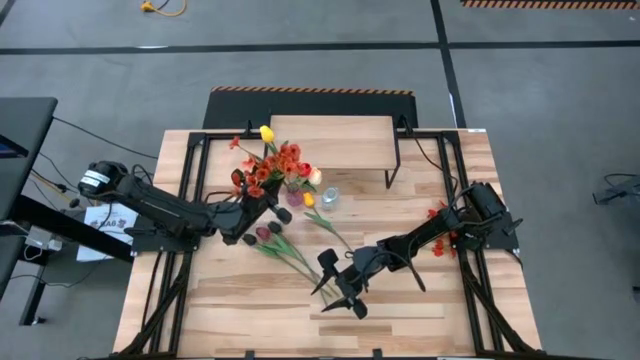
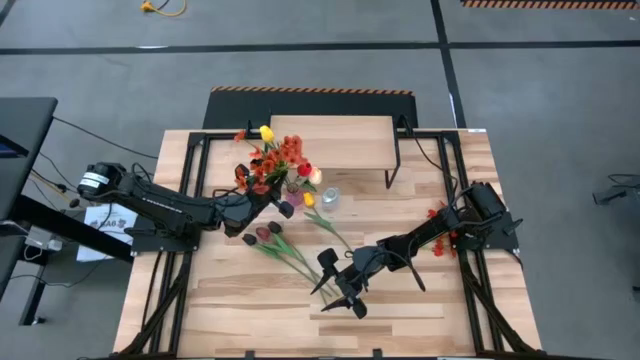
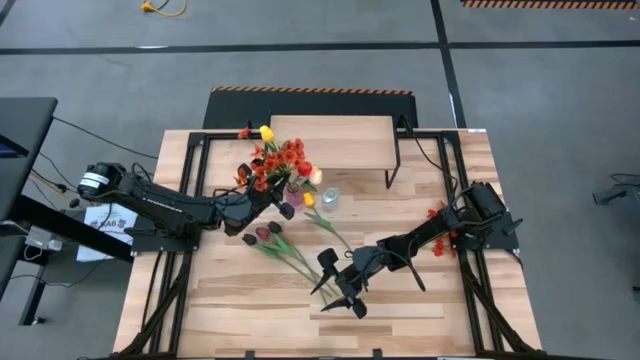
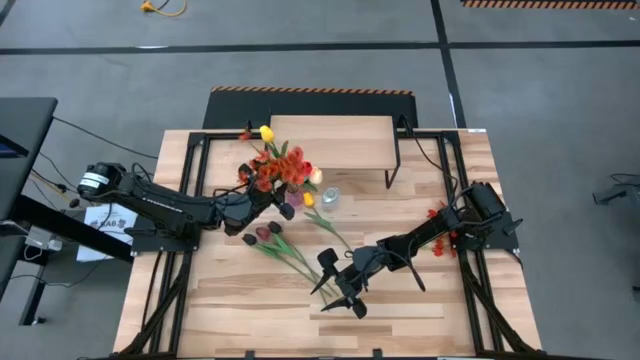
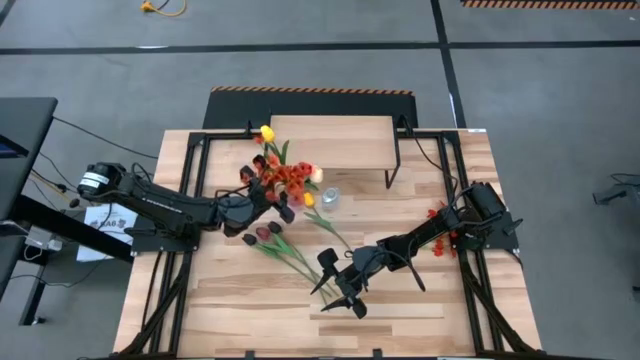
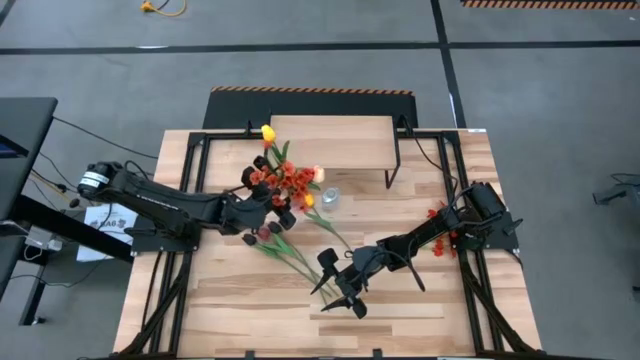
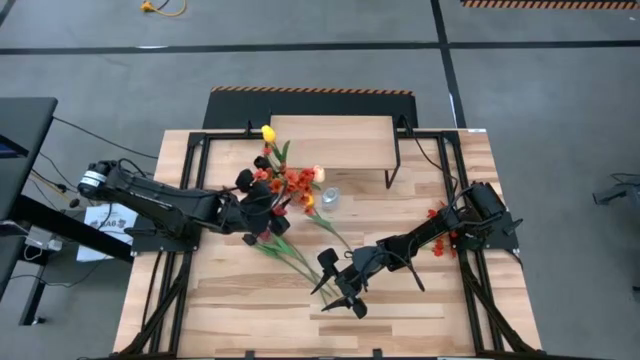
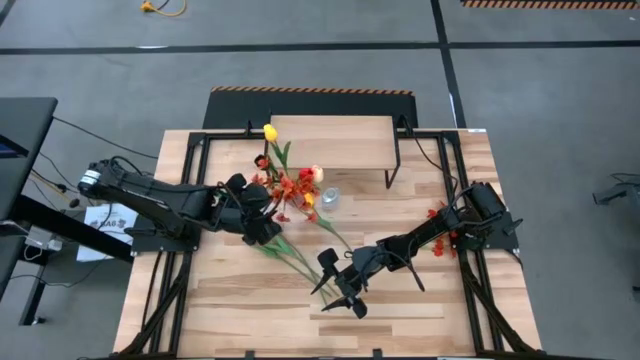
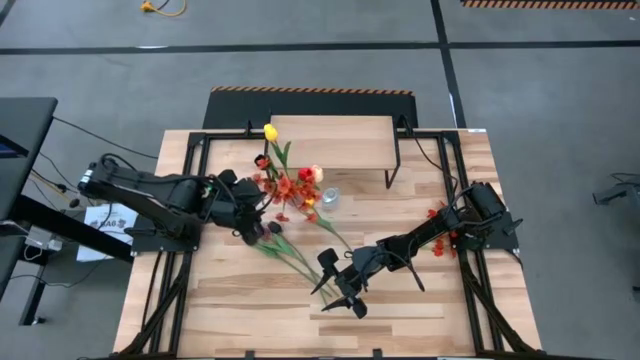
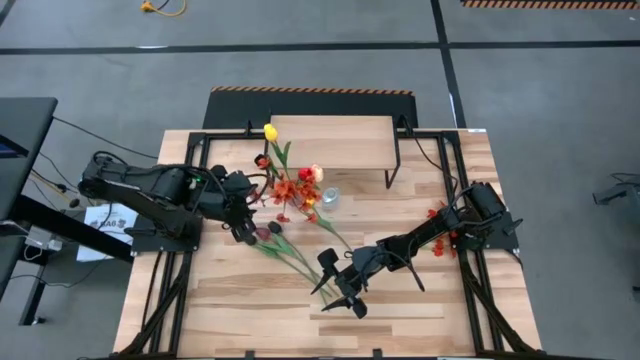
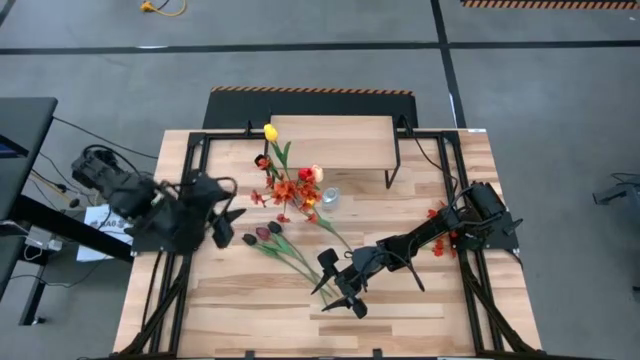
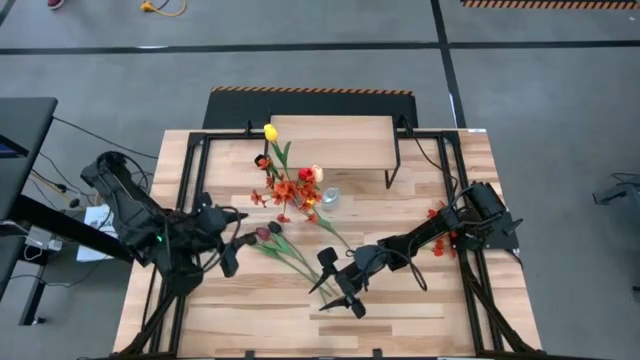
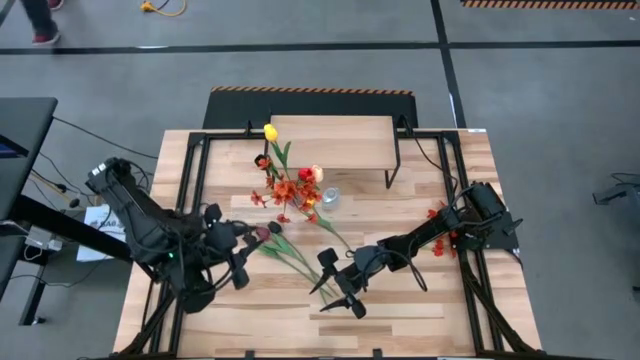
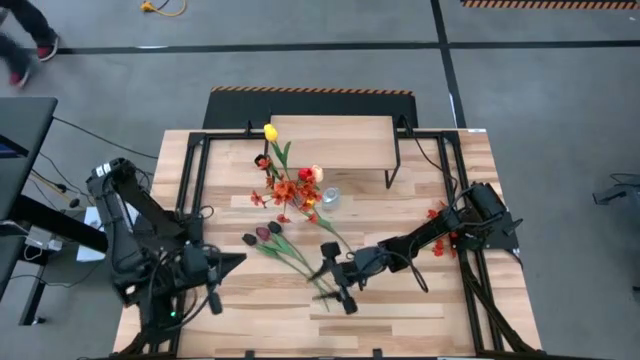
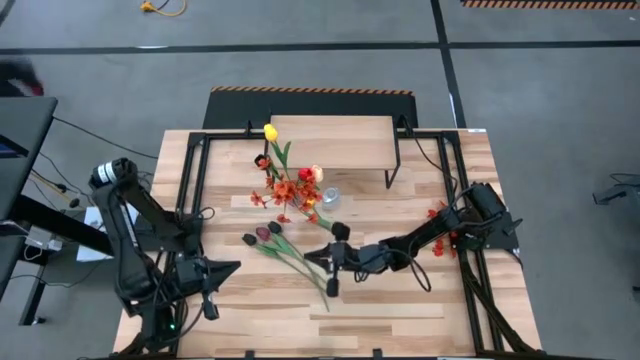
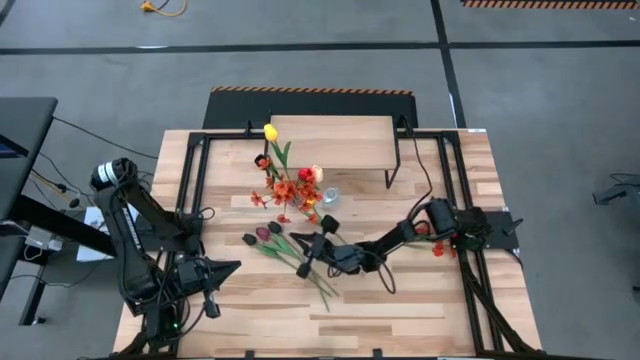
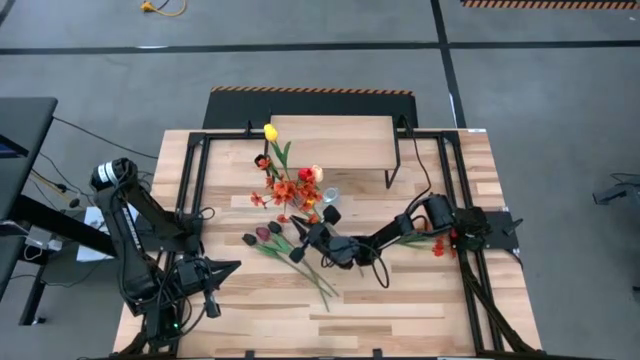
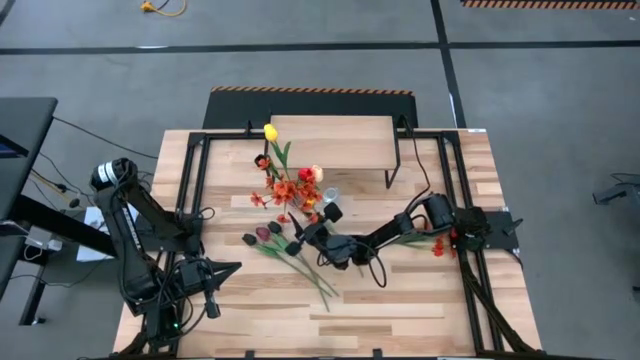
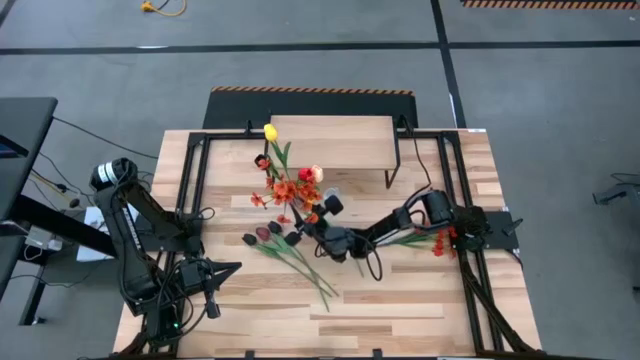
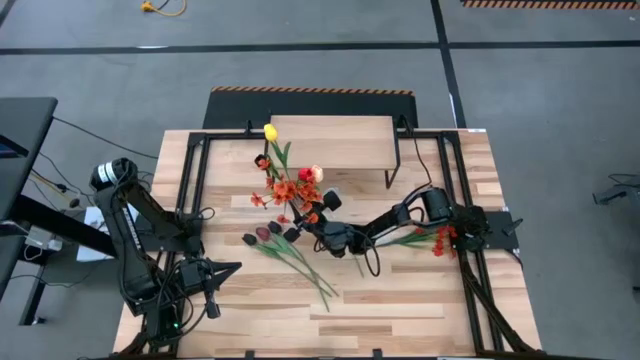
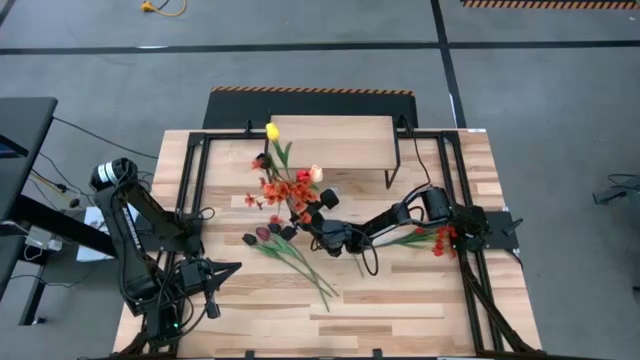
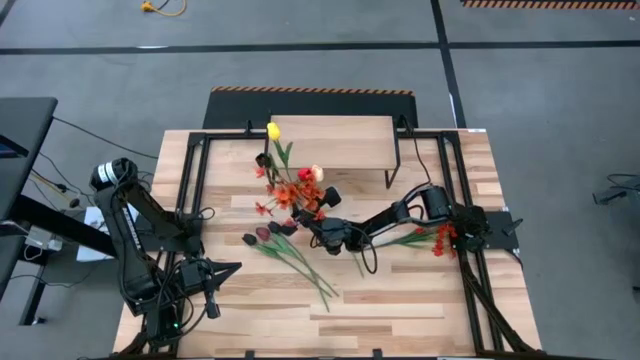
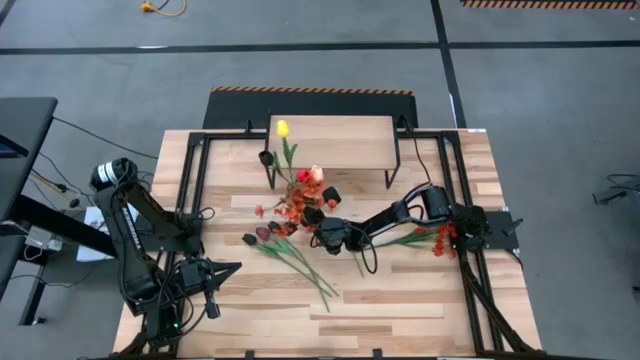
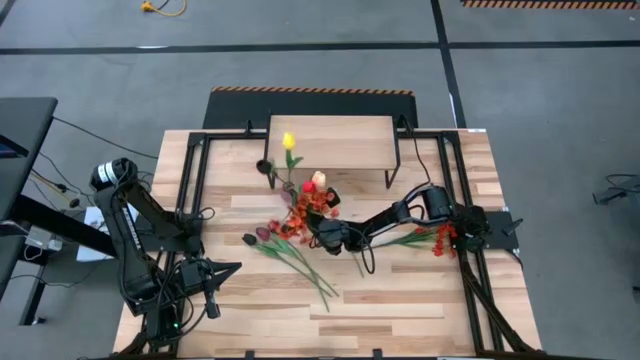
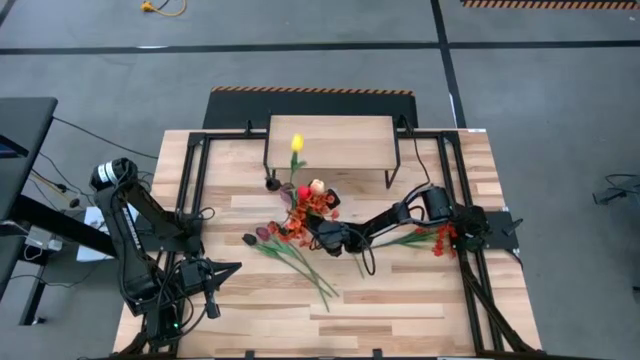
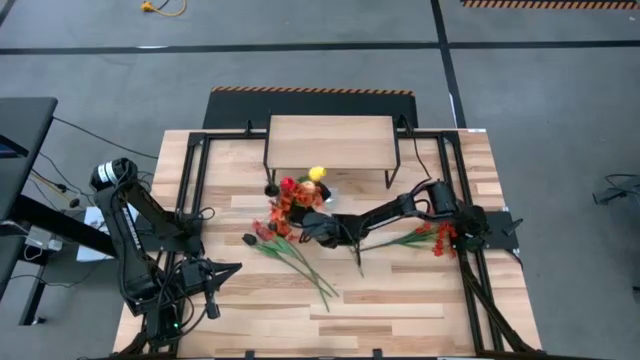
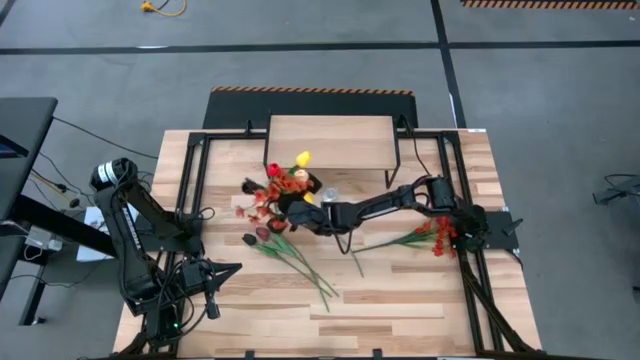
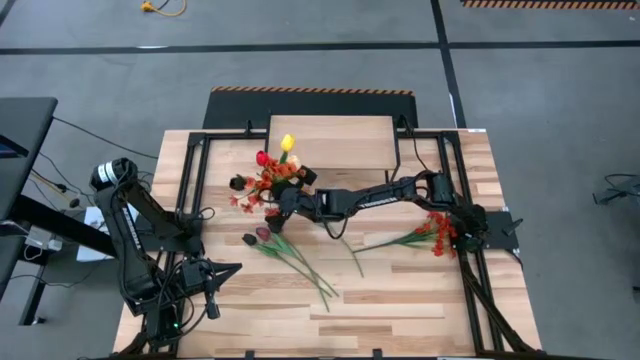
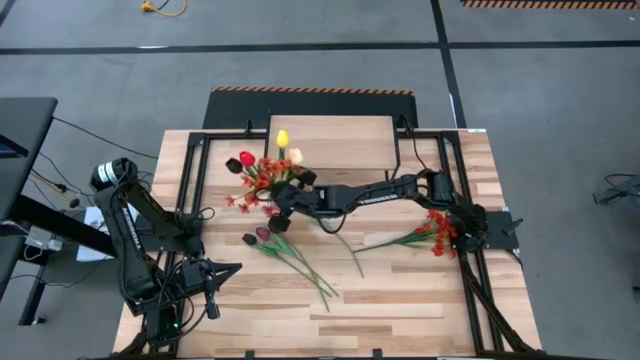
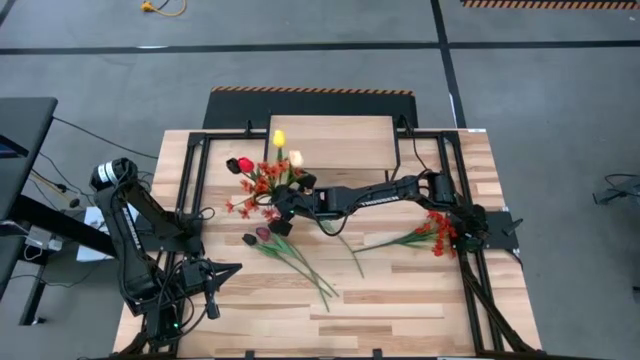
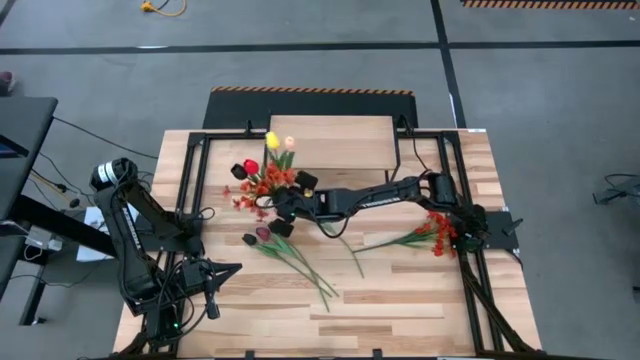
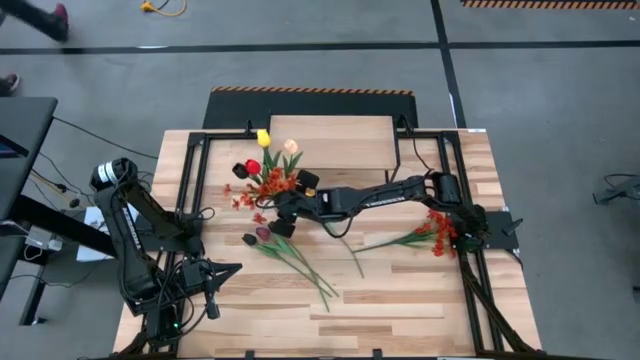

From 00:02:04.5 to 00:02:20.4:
Task: Pick and place flowers into a vace then onto a shelf
Put the bottom orange flowers into the violet vase
